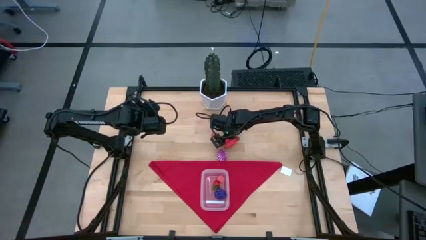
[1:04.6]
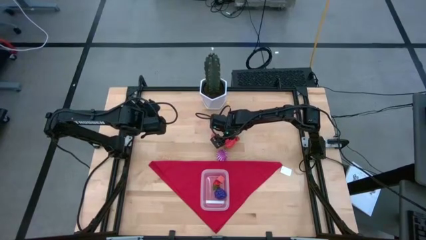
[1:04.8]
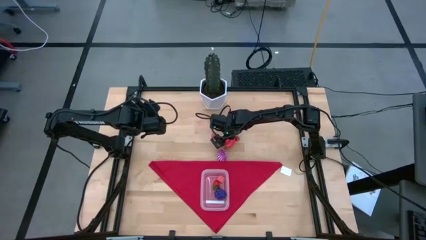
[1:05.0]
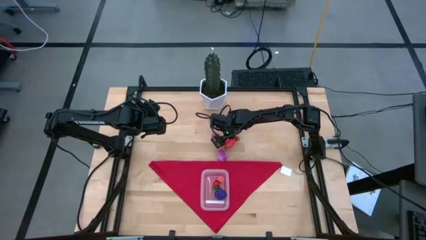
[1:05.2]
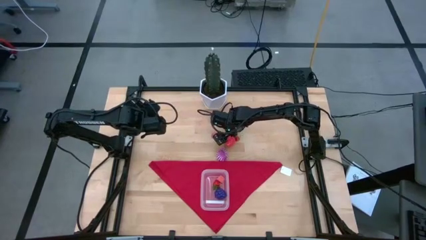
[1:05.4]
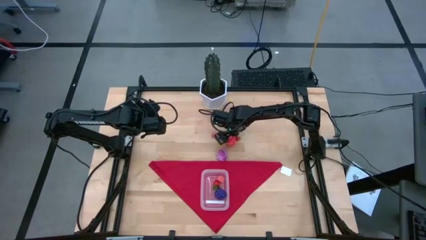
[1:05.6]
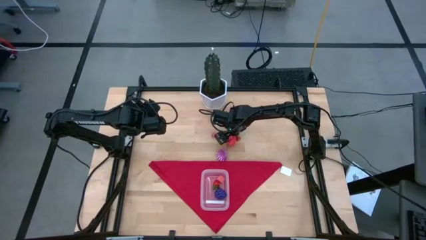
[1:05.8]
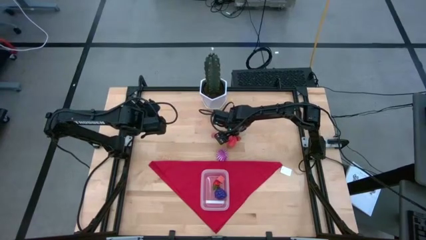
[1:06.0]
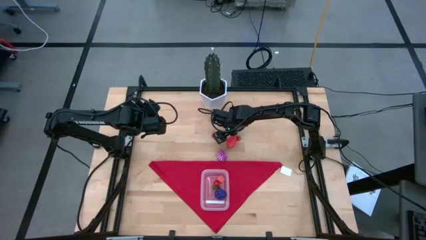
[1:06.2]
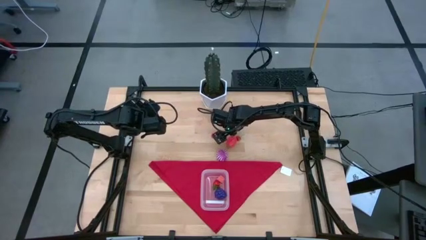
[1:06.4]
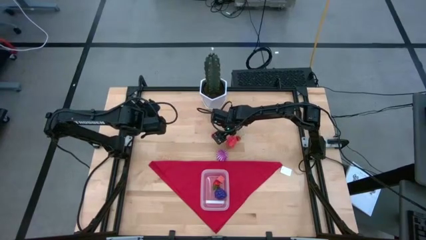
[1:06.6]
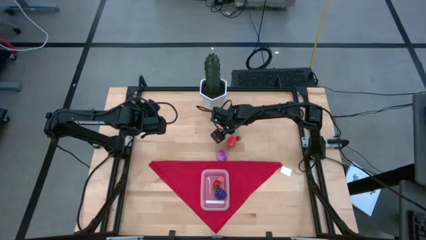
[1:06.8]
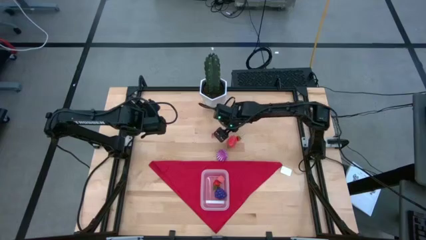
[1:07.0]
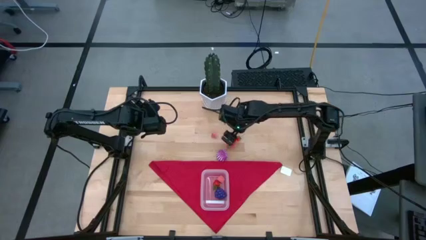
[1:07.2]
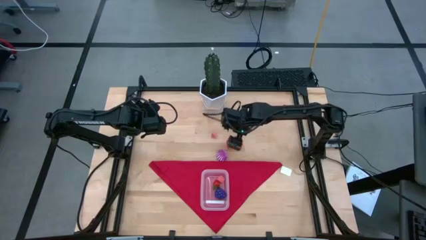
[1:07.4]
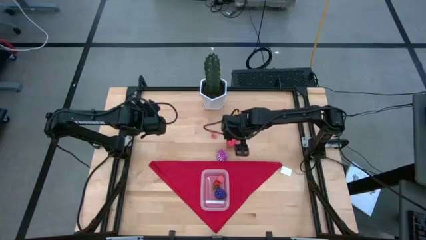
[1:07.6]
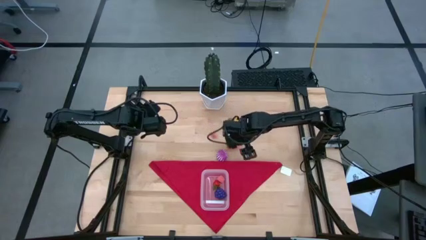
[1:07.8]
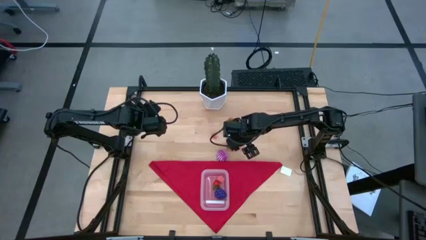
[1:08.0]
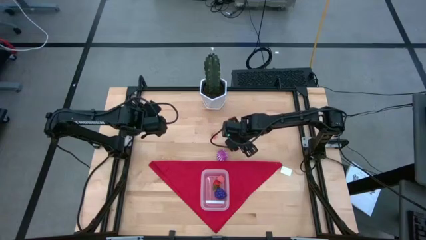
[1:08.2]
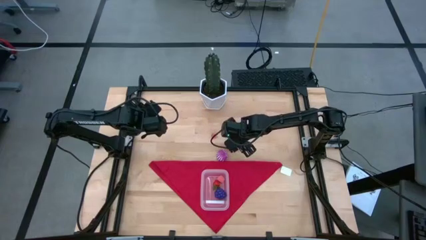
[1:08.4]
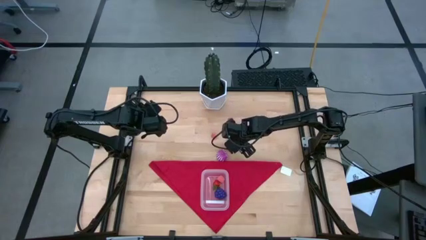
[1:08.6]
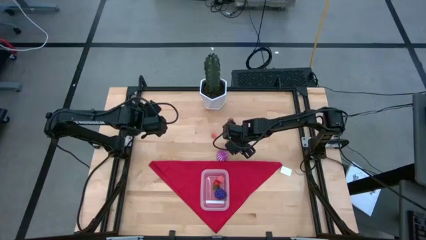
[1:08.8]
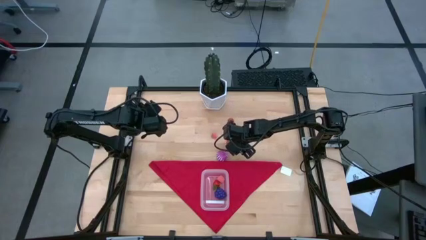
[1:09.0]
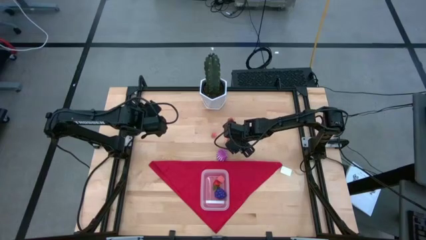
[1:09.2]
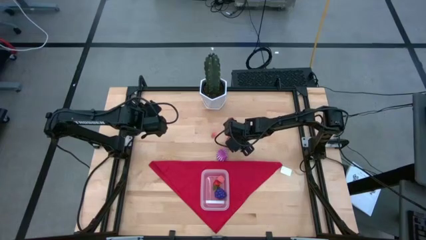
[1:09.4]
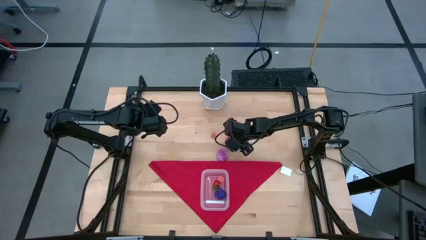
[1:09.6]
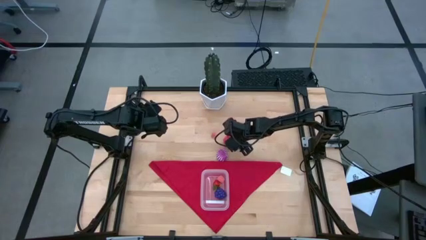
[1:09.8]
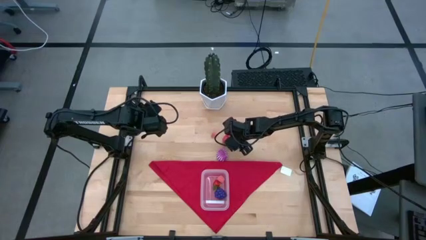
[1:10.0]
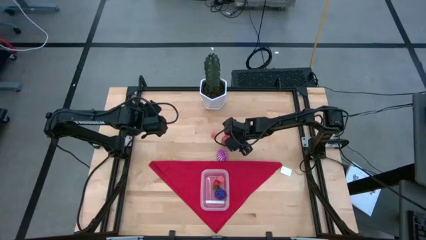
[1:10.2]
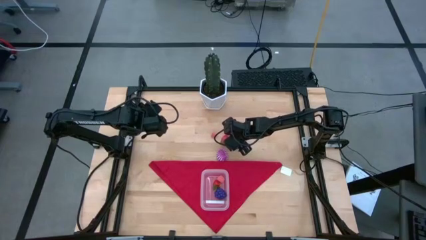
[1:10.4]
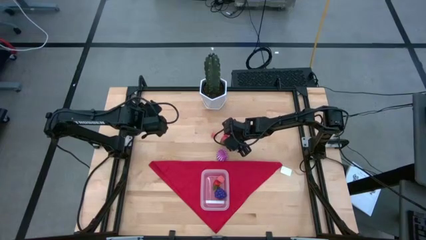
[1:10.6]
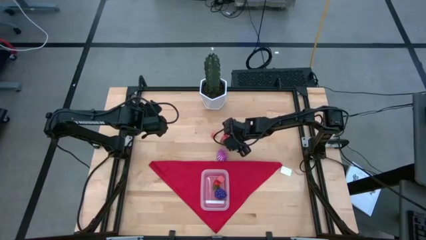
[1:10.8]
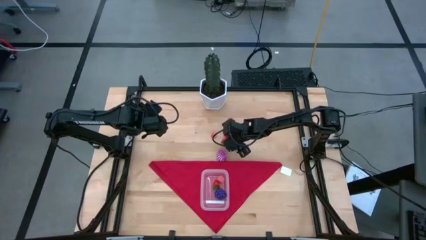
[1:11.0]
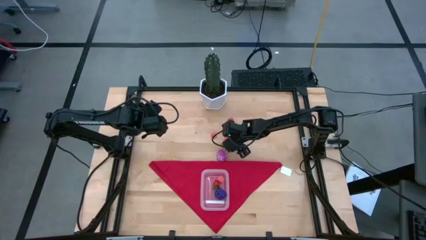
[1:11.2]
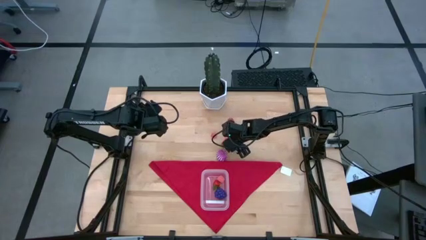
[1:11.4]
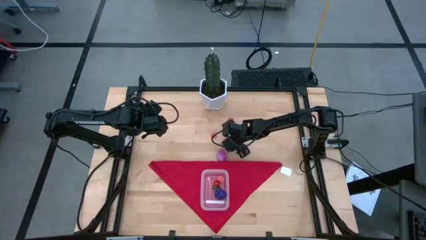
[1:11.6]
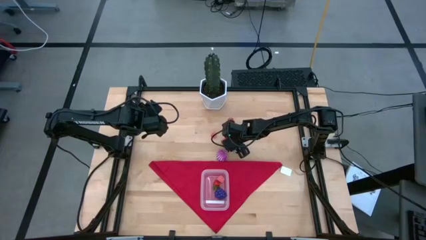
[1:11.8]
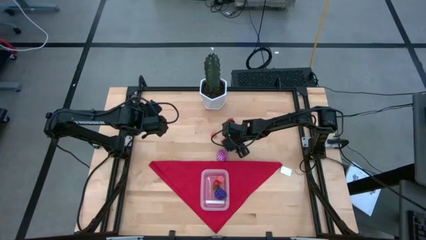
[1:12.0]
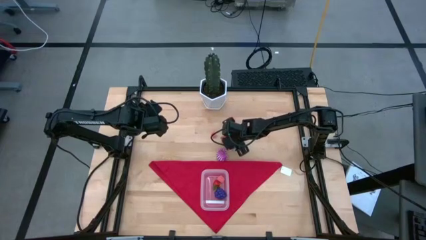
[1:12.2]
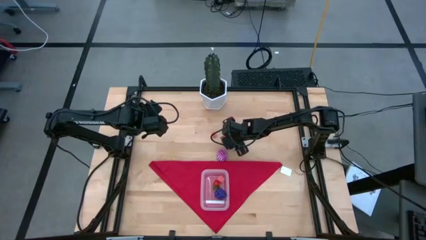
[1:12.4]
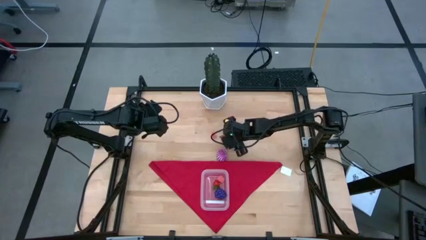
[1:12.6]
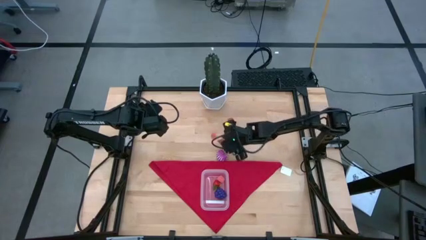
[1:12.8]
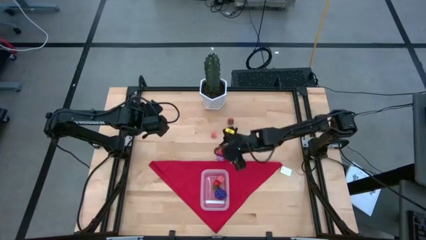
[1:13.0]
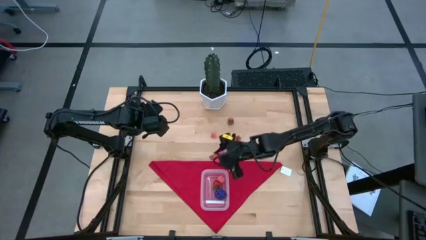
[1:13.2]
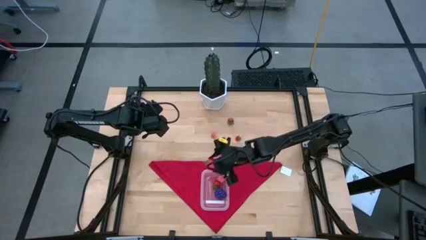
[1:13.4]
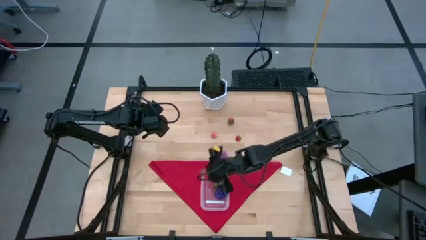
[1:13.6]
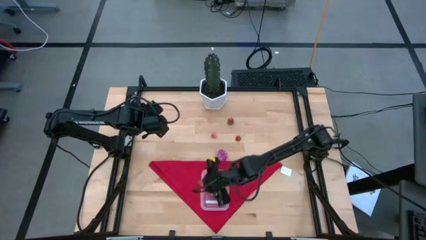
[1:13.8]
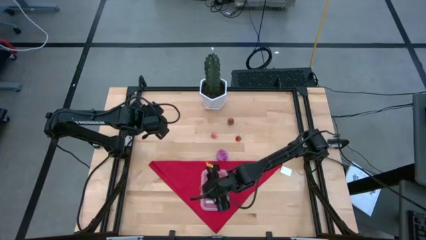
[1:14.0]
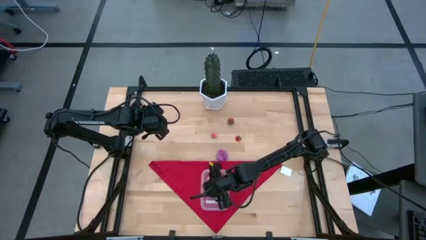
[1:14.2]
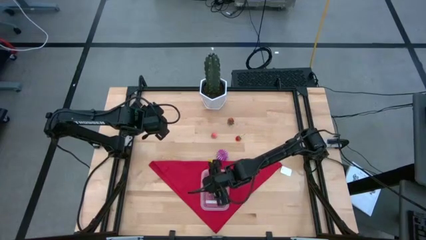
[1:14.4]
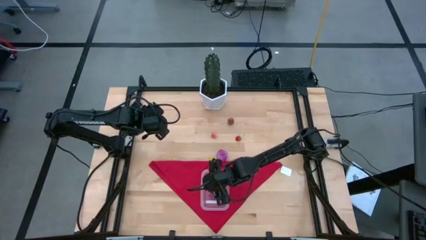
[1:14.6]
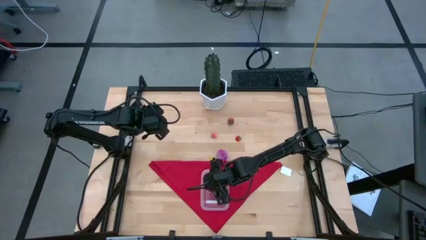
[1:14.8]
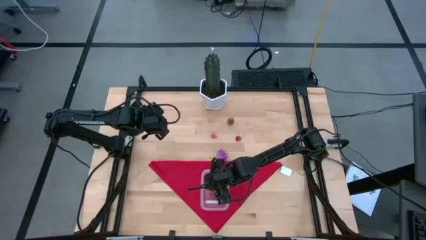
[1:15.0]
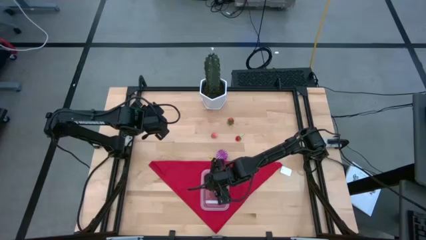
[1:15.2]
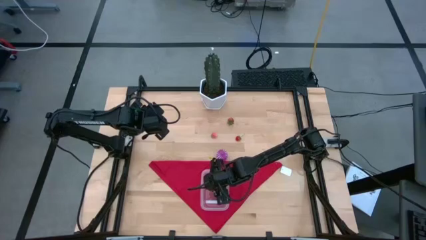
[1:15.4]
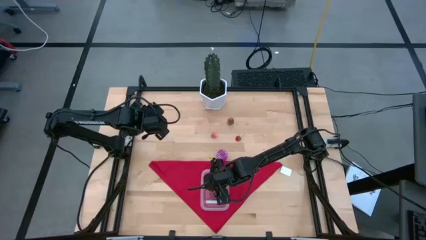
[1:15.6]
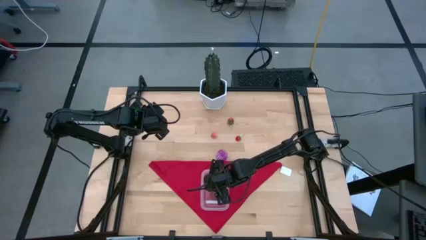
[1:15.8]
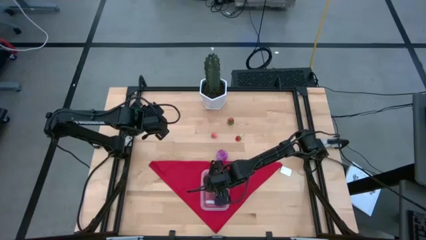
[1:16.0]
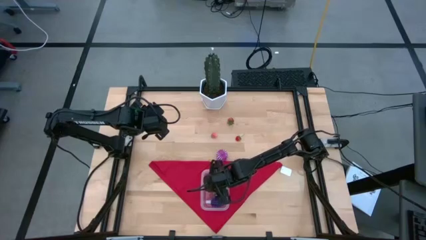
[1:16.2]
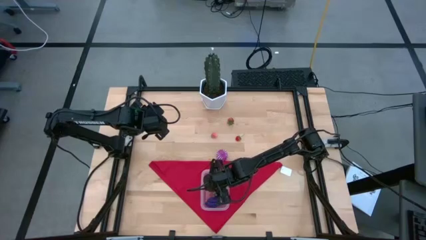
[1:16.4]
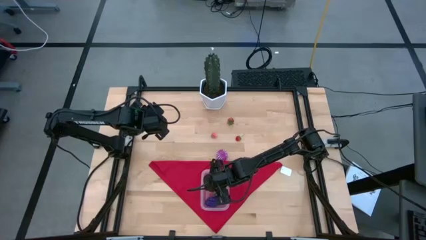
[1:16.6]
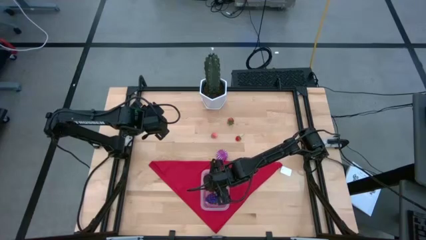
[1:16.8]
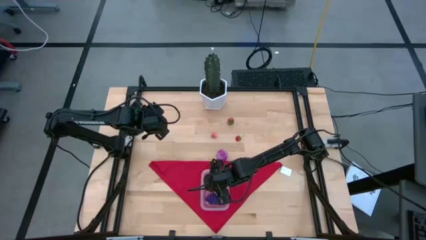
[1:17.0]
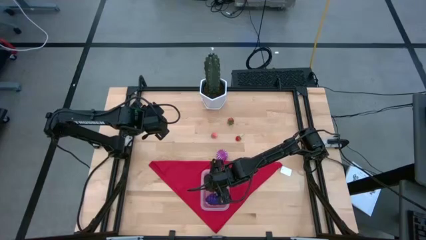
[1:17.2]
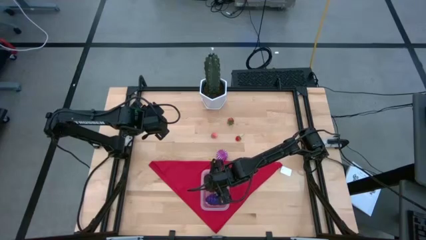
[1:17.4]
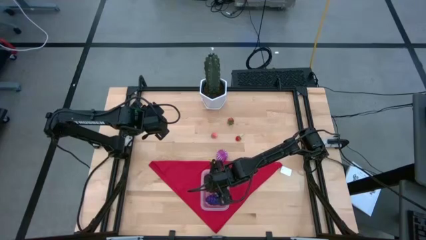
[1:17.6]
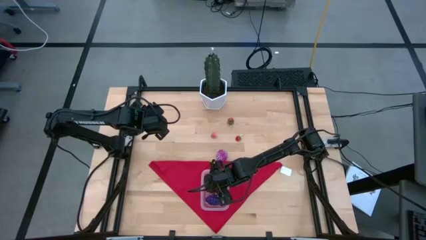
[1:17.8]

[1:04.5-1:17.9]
Task: Pick and placing Produce into tupperware
Put the dragon fruit into the transparent bin
